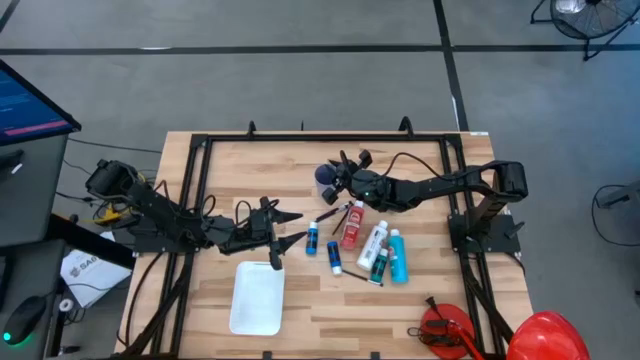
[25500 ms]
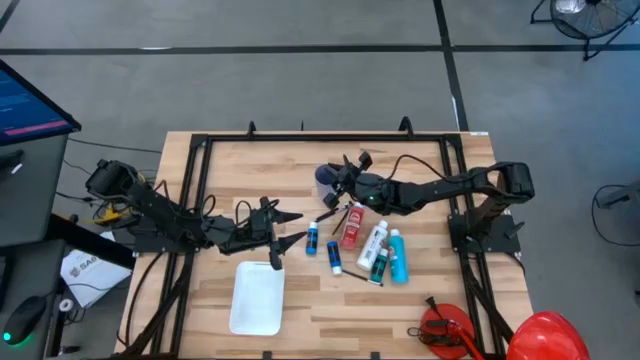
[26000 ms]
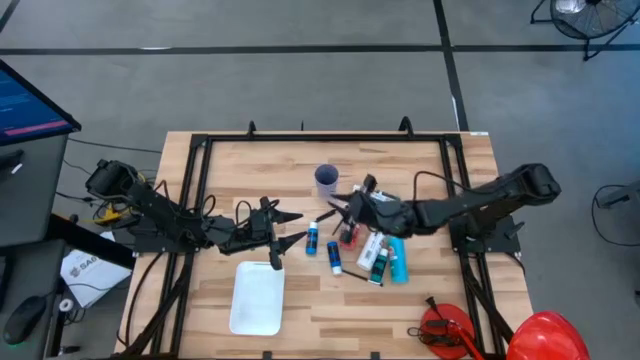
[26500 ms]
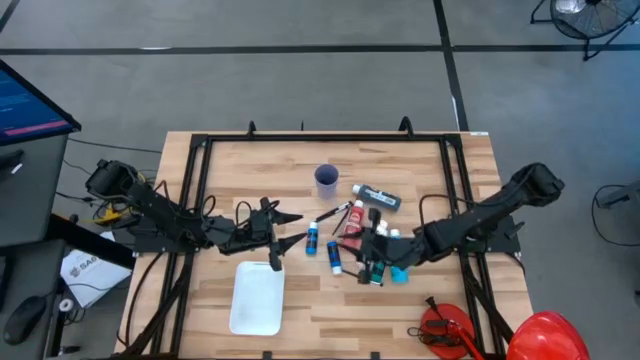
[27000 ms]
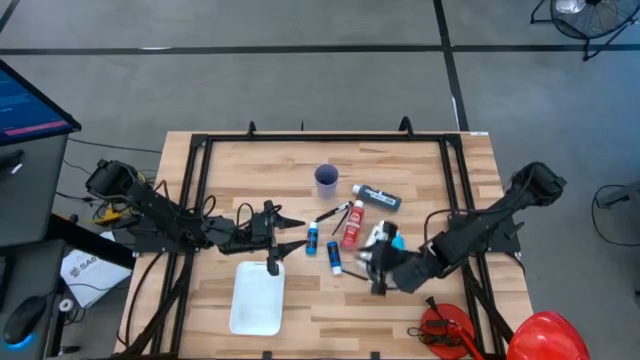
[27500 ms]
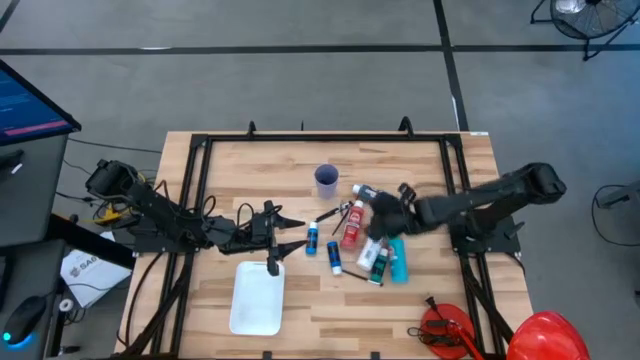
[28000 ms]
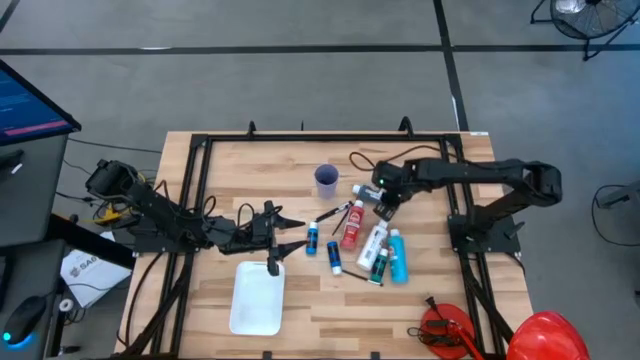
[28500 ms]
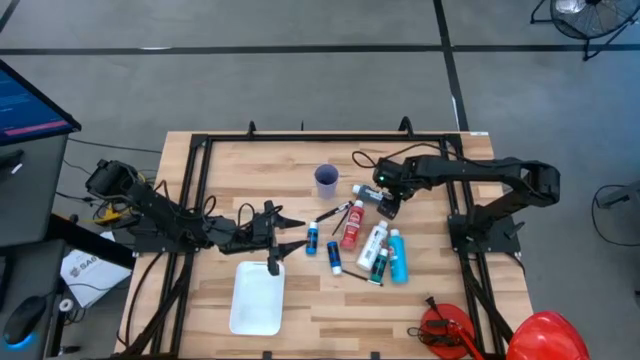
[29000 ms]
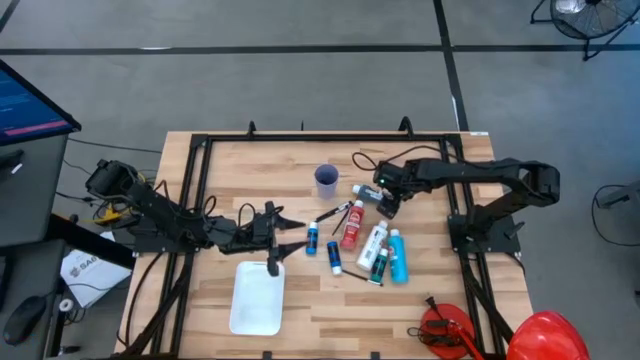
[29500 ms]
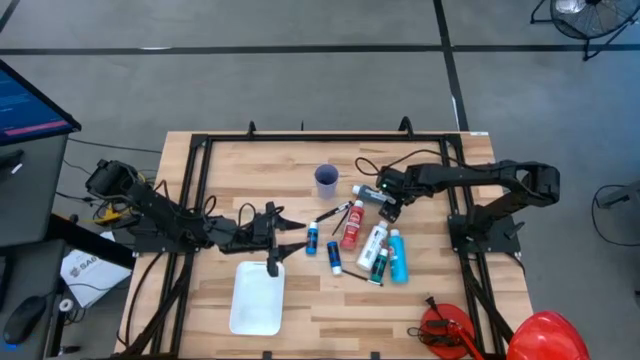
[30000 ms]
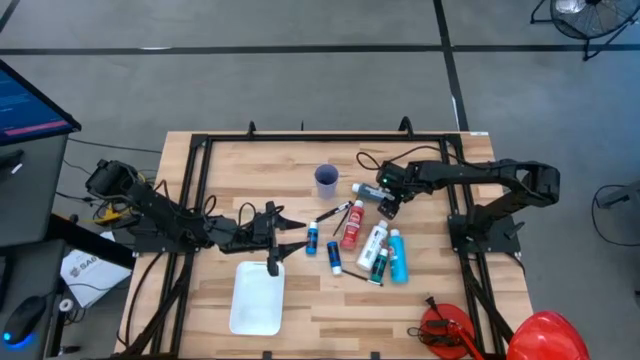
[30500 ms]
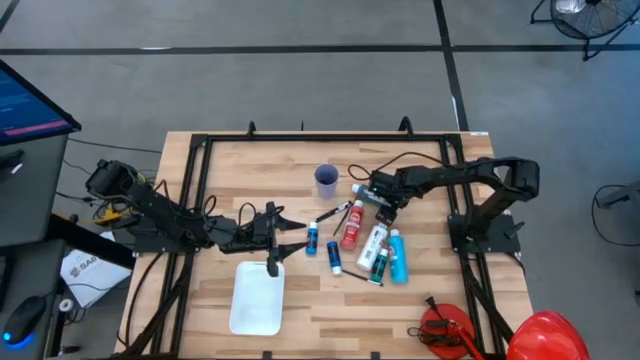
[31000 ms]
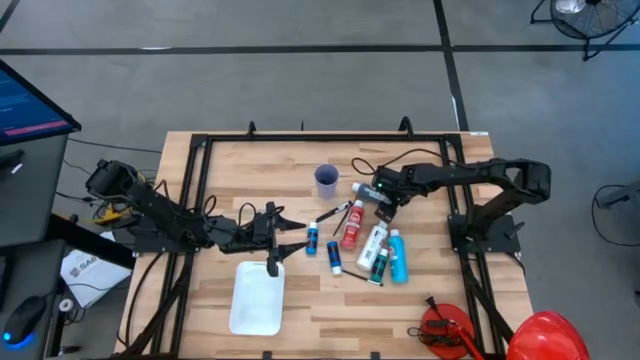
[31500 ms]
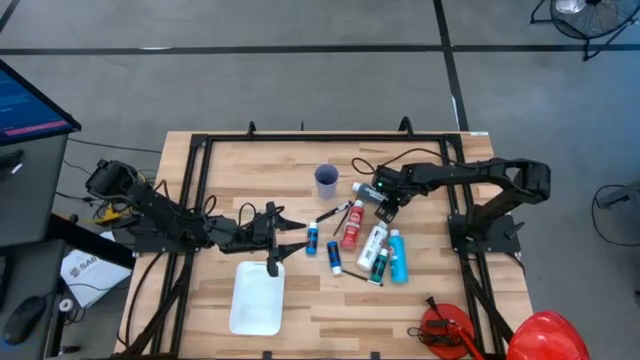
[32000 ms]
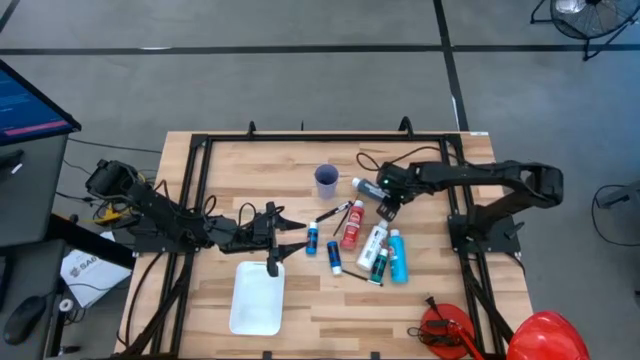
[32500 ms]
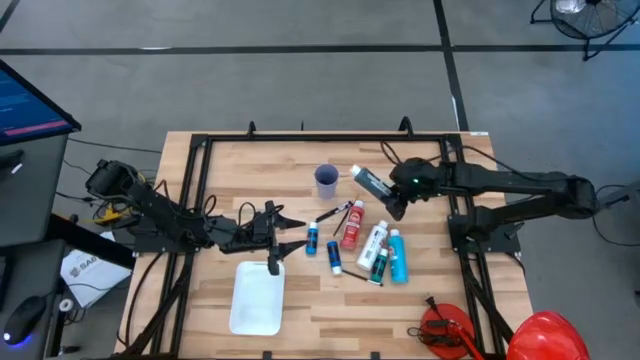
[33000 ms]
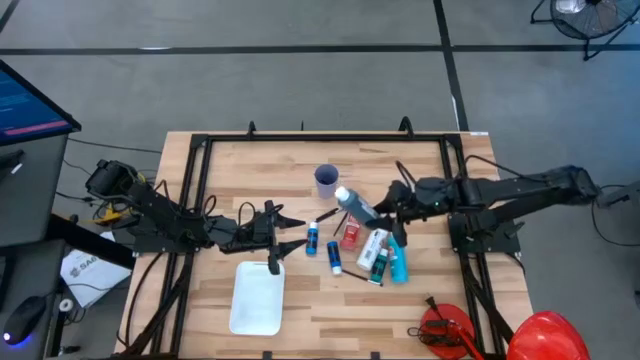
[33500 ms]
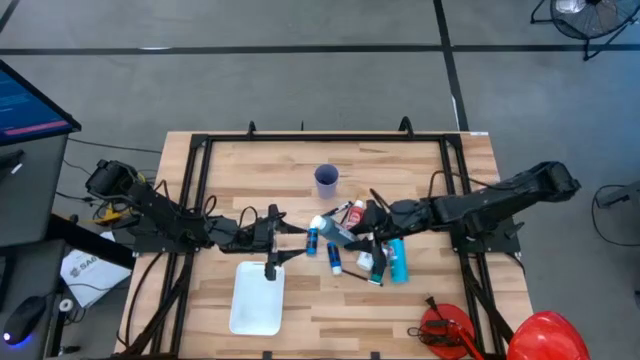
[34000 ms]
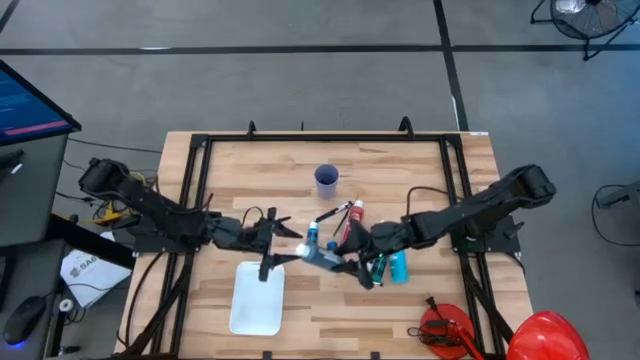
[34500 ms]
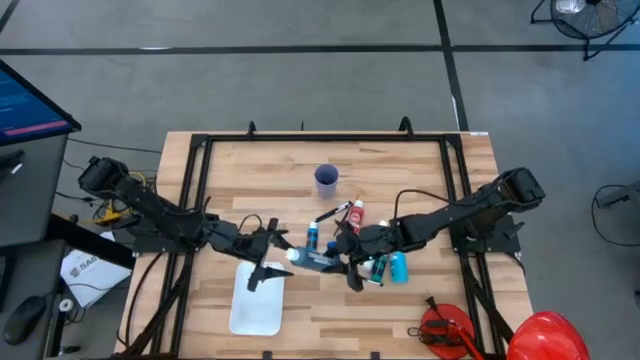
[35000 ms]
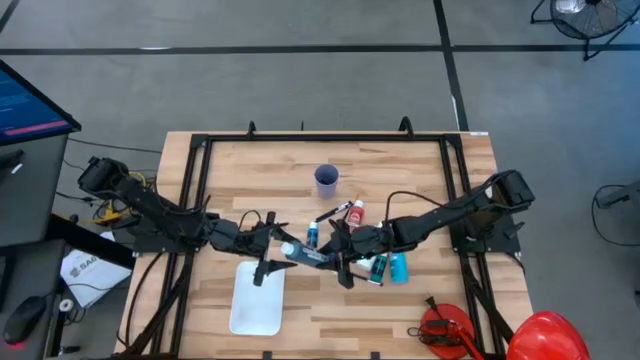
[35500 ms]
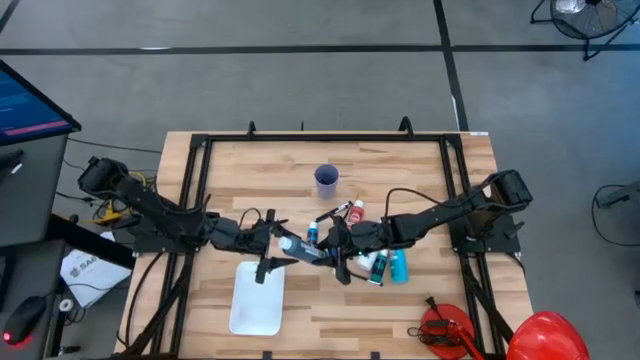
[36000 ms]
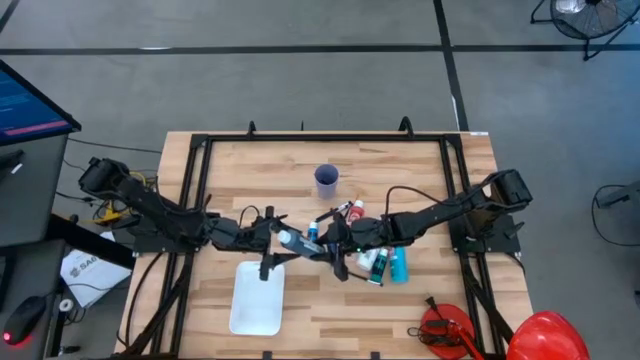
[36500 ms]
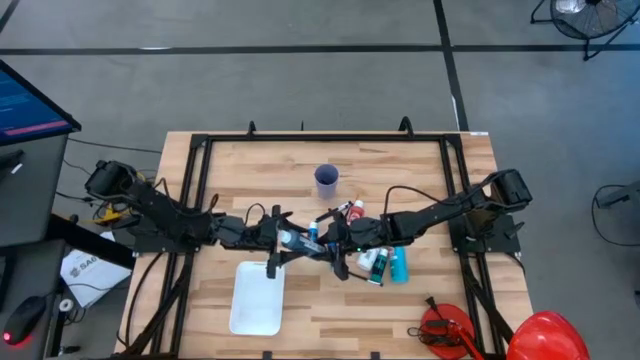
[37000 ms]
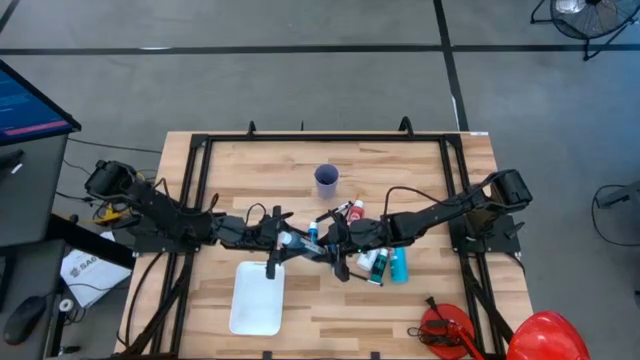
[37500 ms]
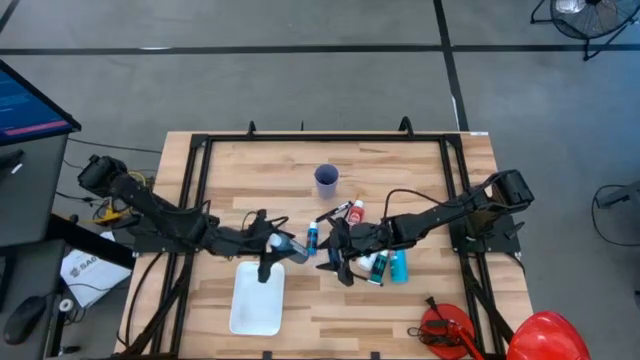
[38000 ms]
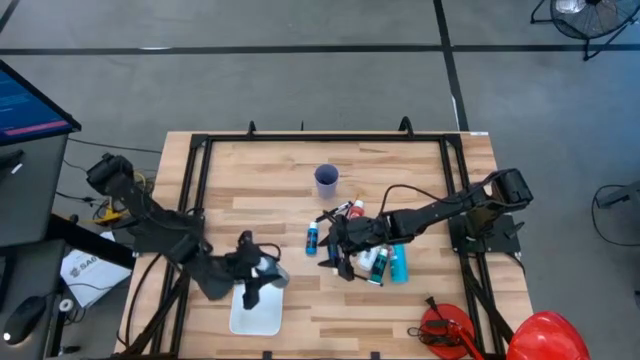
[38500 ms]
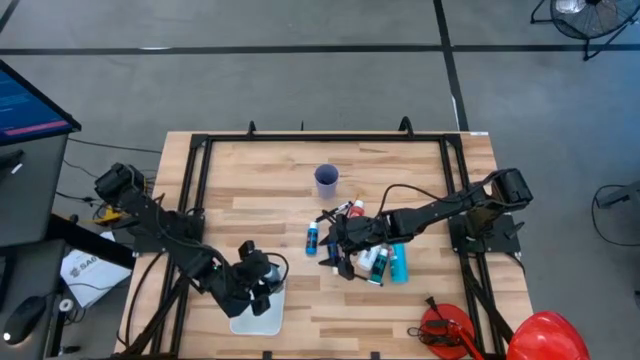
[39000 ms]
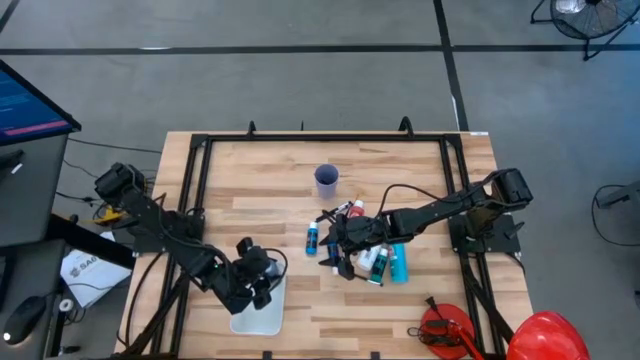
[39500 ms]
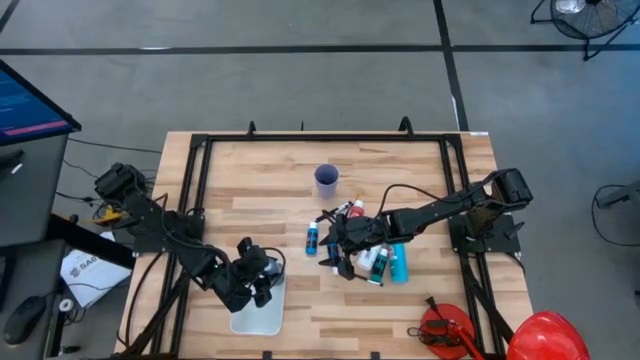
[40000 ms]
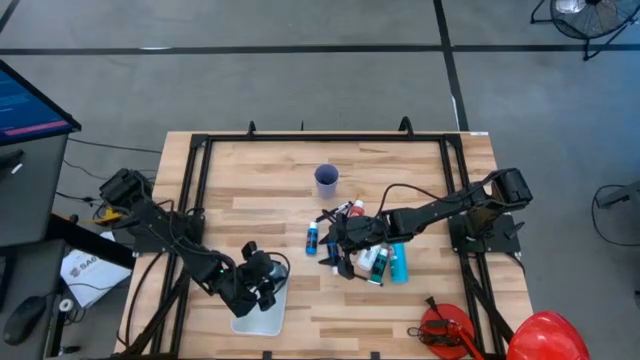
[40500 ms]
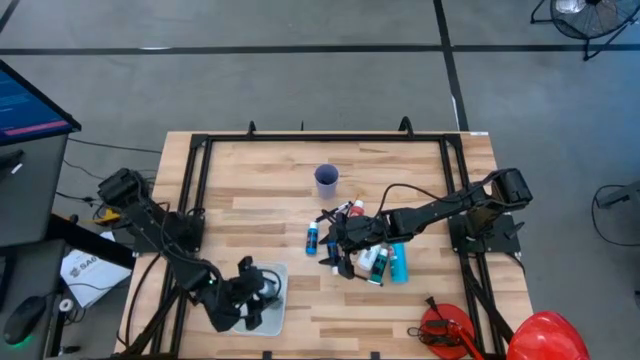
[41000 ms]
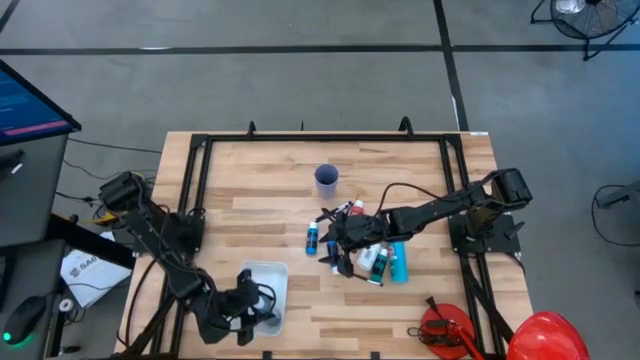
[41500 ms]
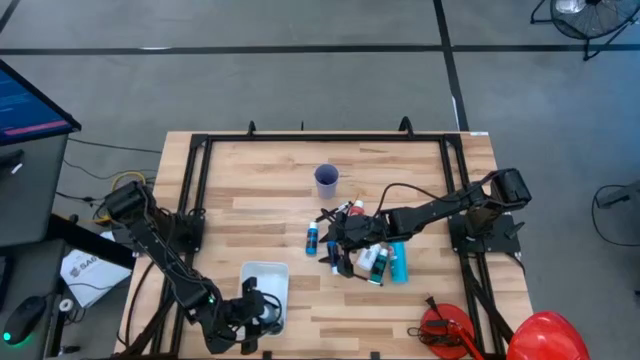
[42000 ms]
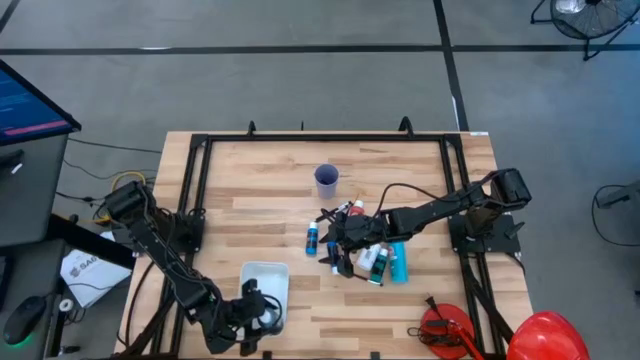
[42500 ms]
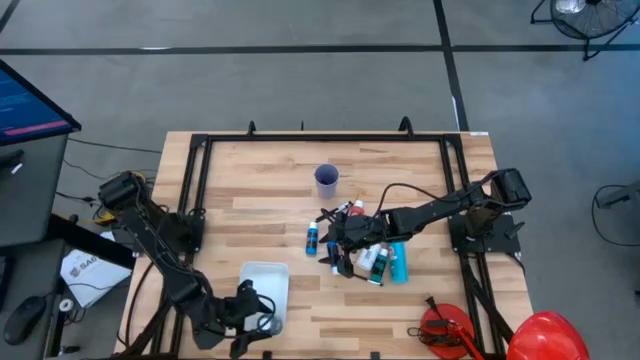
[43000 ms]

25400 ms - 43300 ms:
Task: Pick & Place Paint Supplies
Put the black paint bottle into the white bin
